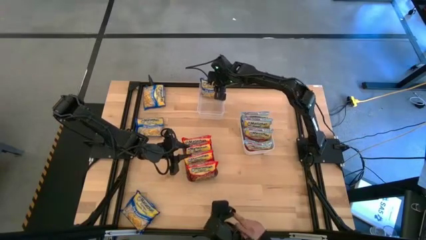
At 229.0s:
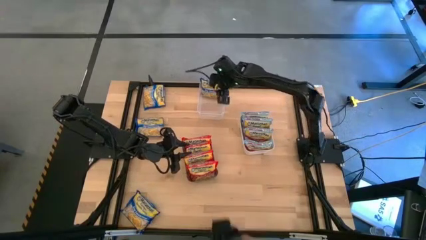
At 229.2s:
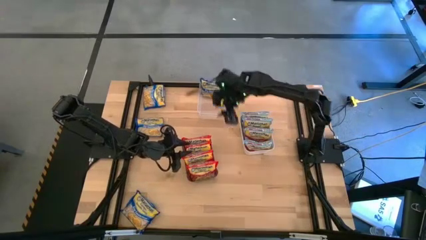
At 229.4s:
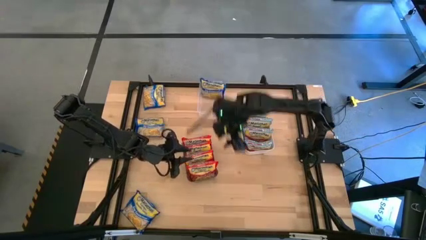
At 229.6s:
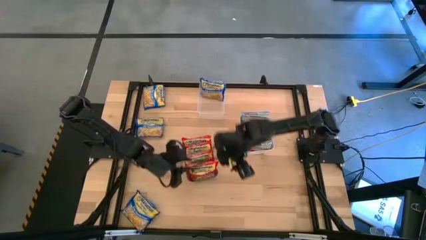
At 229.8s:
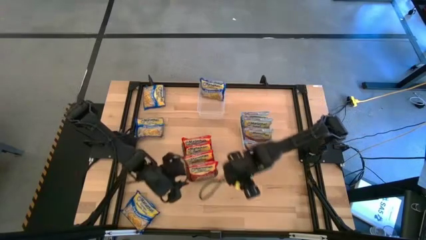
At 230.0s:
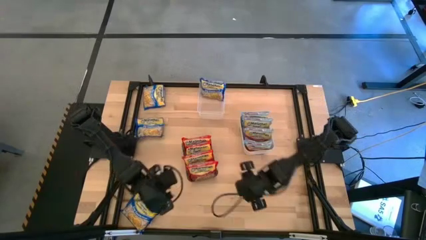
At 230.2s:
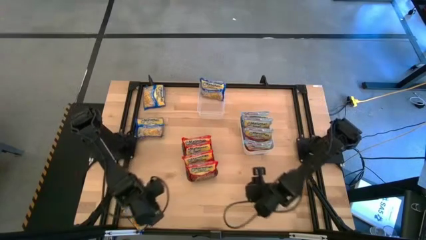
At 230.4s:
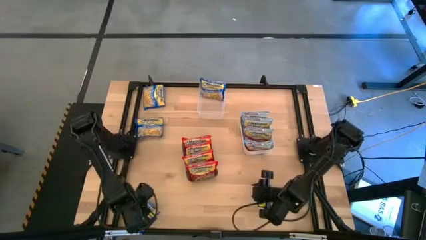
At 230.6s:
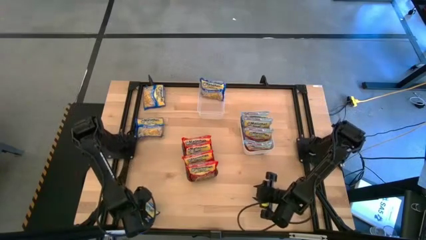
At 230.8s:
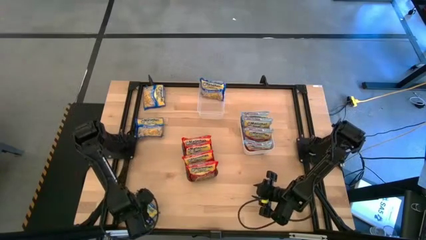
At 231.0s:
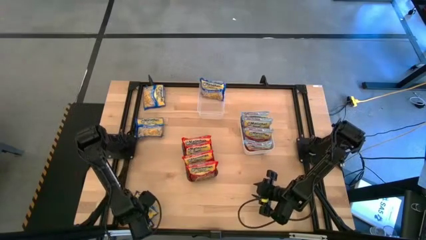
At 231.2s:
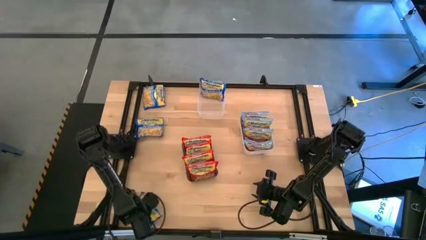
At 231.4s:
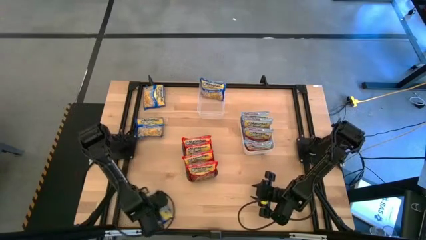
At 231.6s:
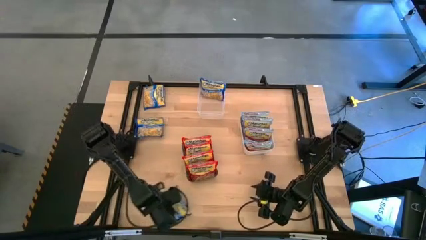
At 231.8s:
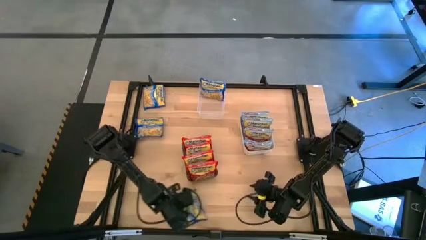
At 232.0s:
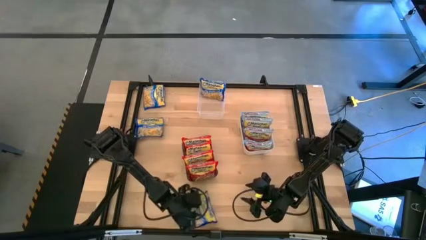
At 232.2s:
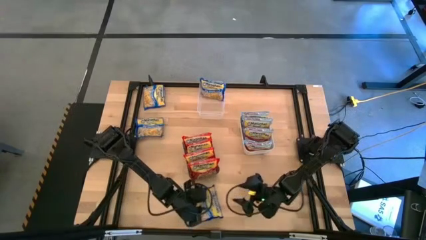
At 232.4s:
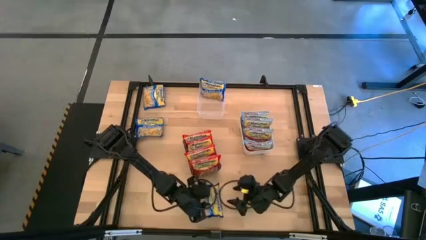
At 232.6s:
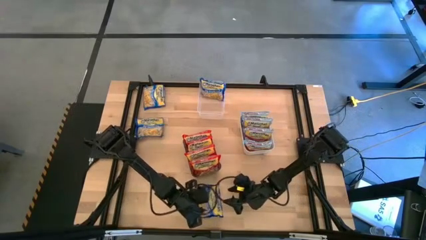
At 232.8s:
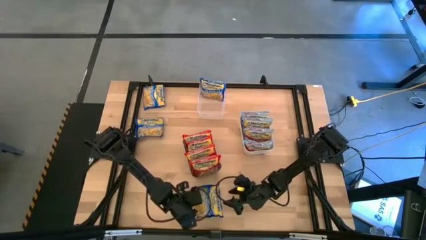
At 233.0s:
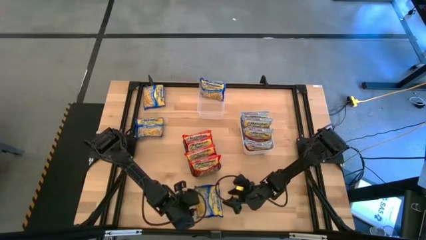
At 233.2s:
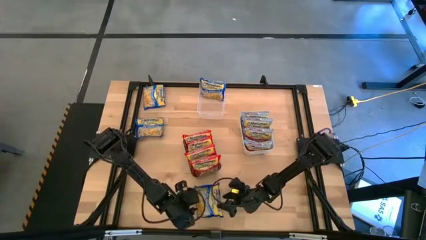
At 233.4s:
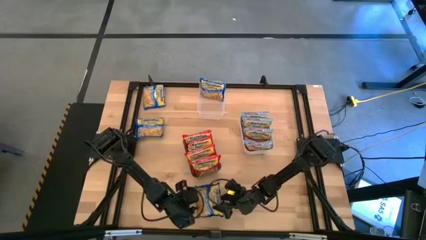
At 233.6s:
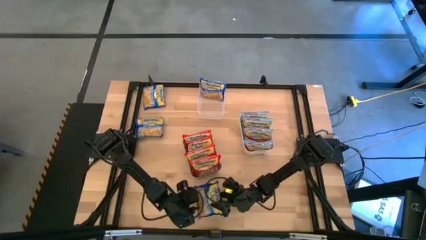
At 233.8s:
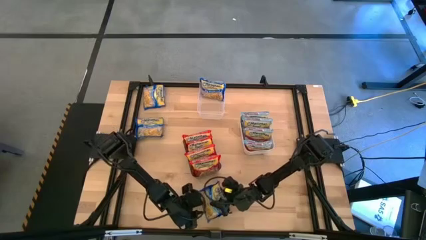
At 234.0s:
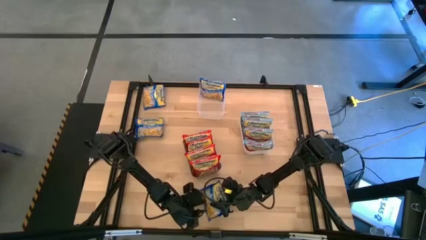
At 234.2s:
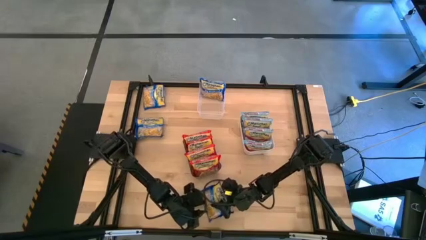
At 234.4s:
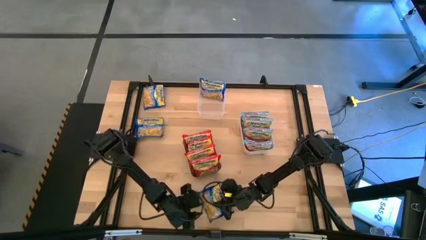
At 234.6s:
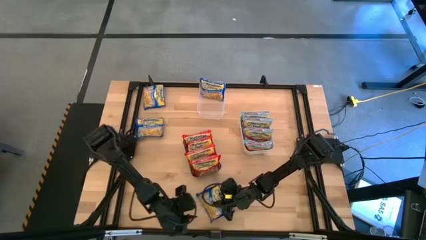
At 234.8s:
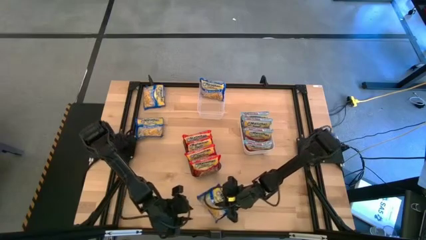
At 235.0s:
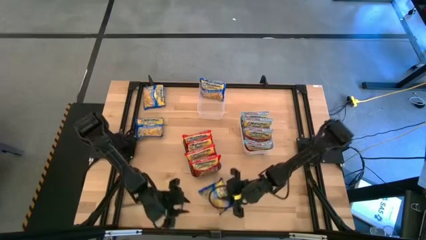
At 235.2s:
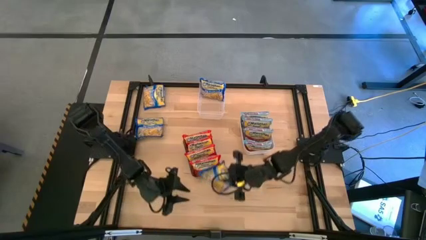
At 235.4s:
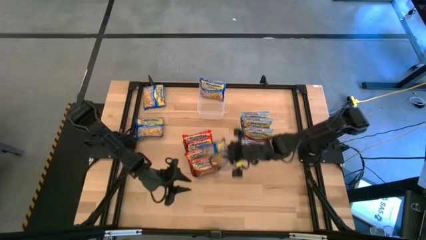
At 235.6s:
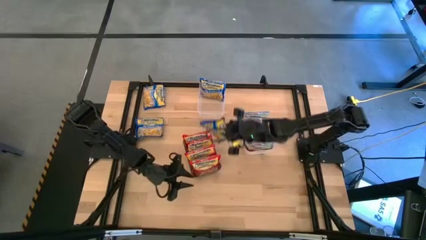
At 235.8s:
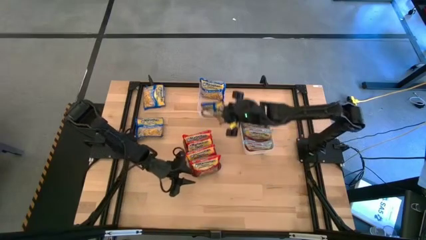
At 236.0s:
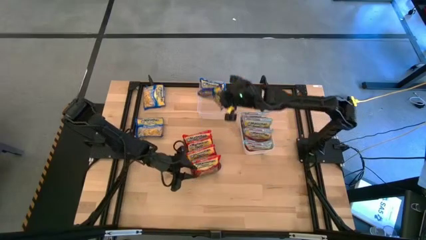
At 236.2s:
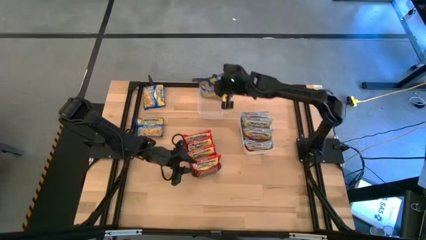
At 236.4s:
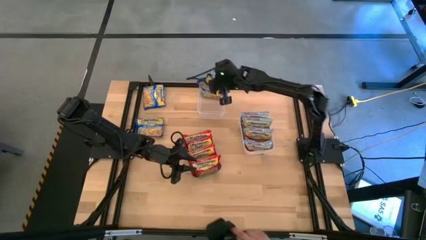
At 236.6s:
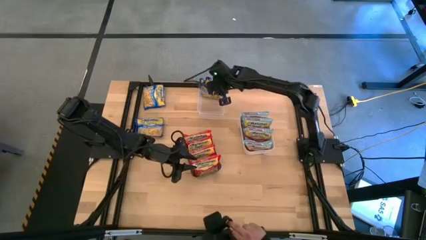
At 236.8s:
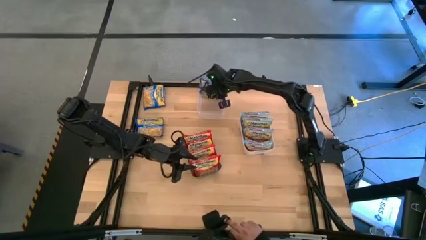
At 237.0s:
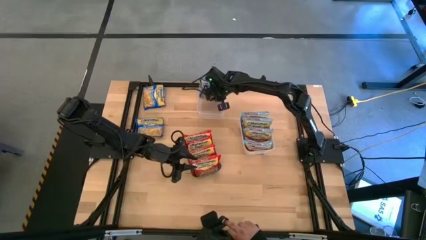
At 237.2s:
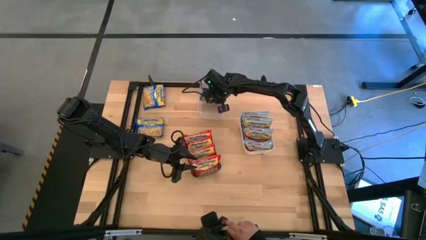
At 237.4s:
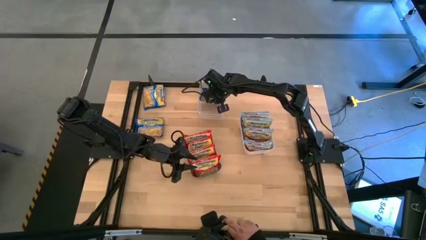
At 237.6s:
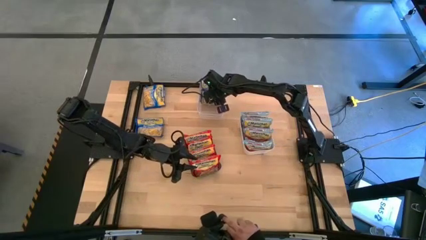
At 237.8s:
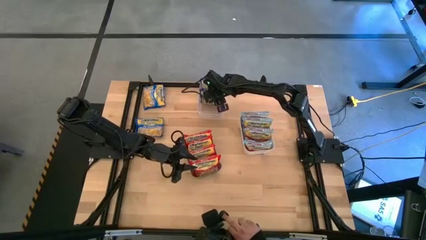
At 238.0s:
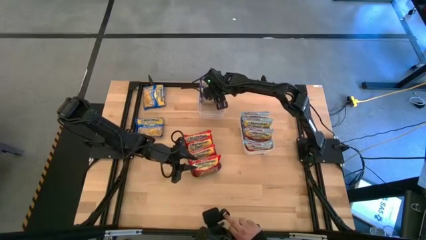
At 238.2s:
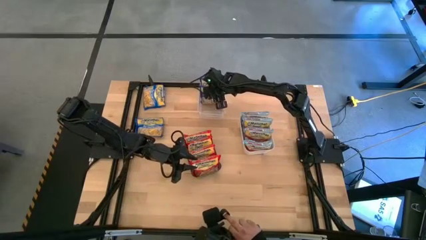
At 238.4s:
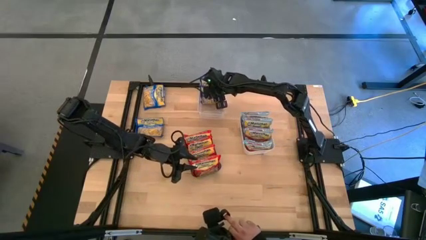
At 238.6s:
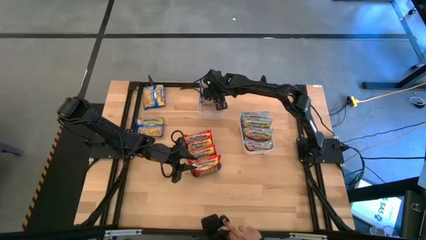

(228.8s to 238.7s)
Task: Sort Maruchan noodles
Put the blue noodle pack into the transparent bin

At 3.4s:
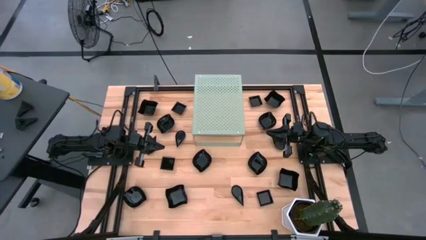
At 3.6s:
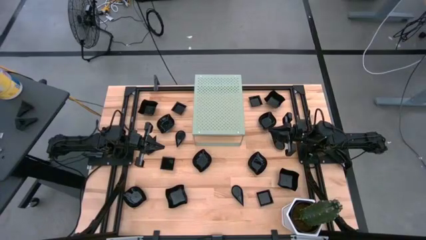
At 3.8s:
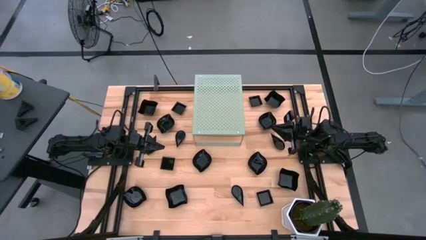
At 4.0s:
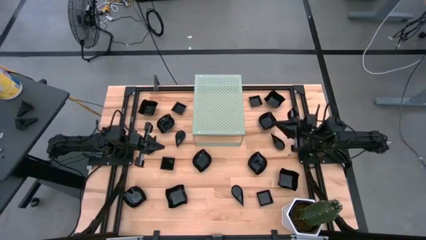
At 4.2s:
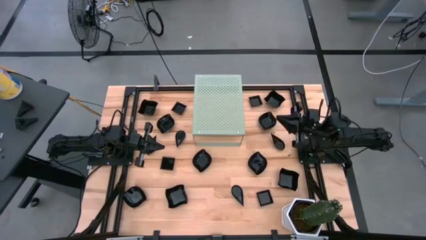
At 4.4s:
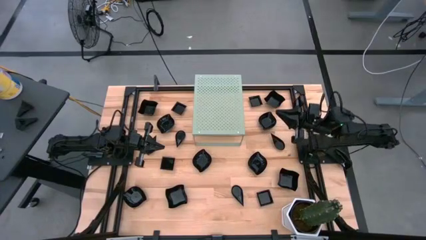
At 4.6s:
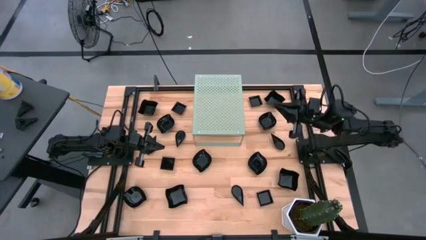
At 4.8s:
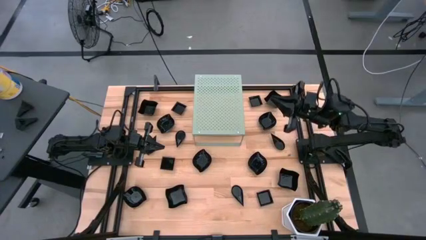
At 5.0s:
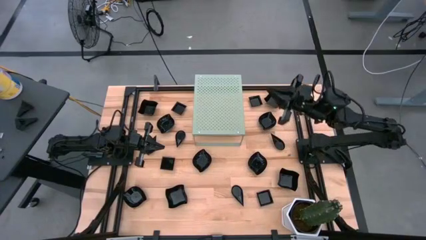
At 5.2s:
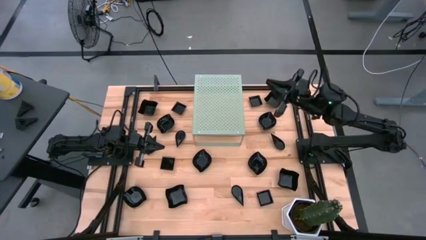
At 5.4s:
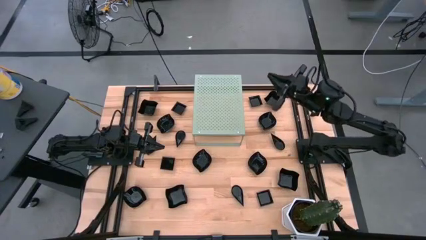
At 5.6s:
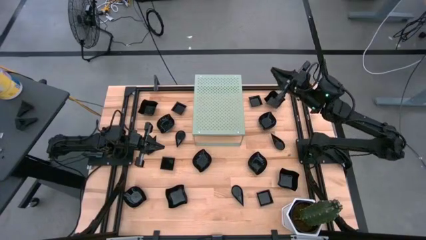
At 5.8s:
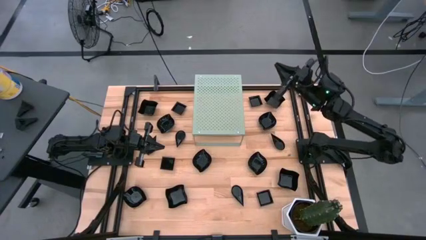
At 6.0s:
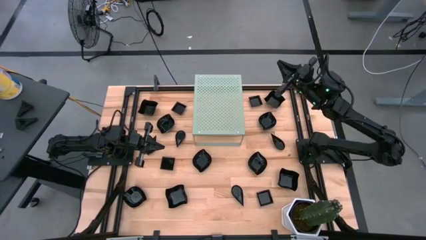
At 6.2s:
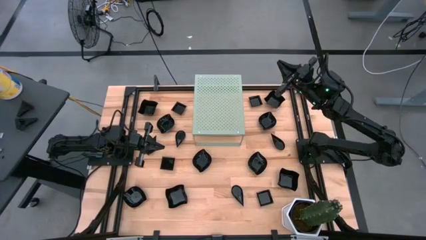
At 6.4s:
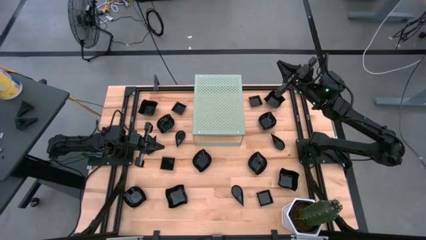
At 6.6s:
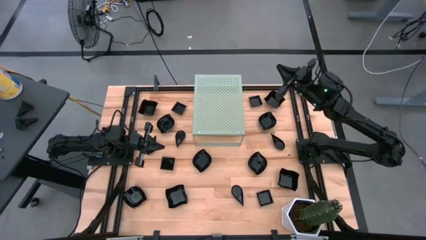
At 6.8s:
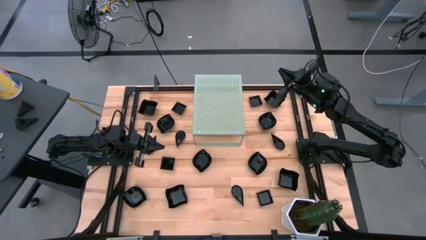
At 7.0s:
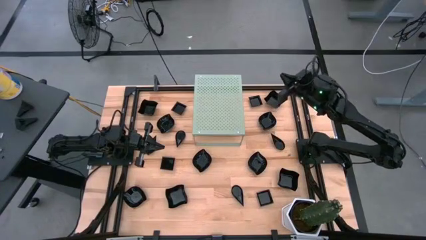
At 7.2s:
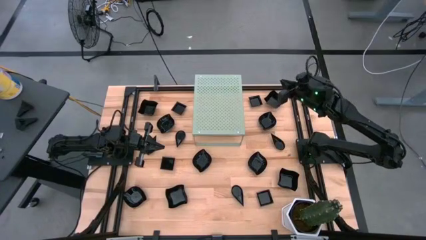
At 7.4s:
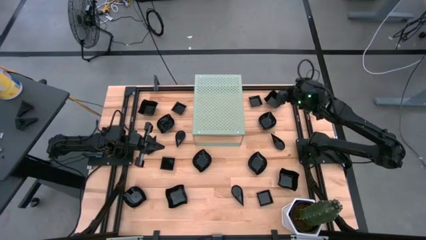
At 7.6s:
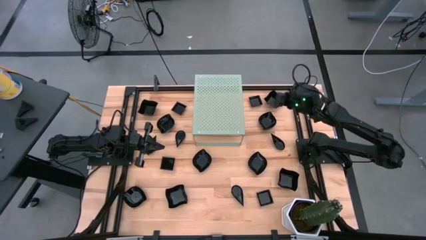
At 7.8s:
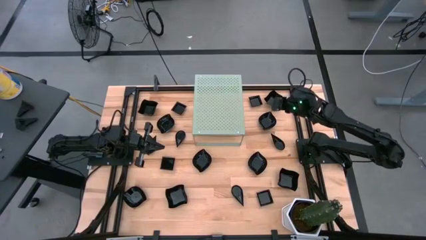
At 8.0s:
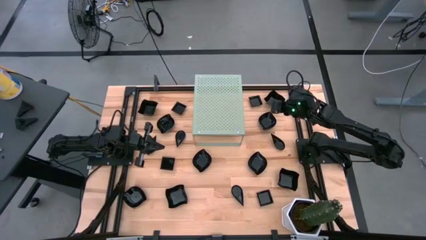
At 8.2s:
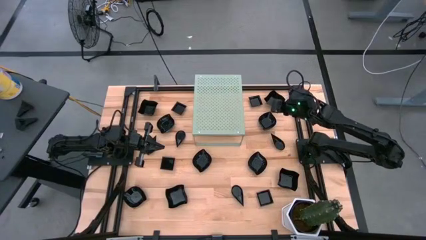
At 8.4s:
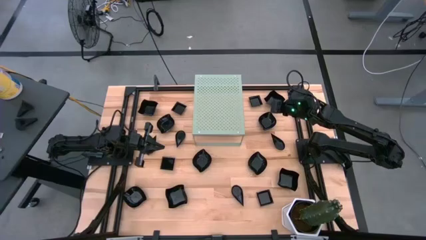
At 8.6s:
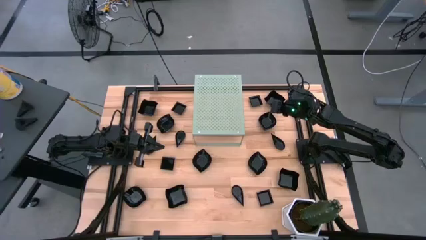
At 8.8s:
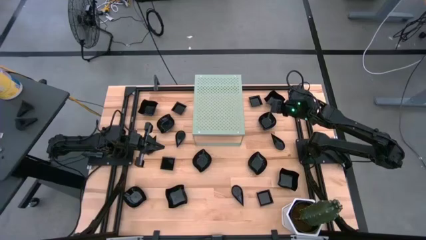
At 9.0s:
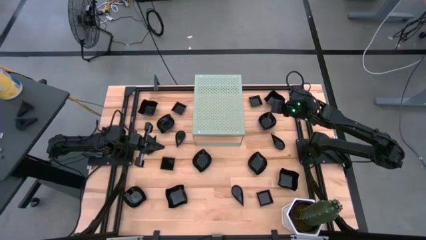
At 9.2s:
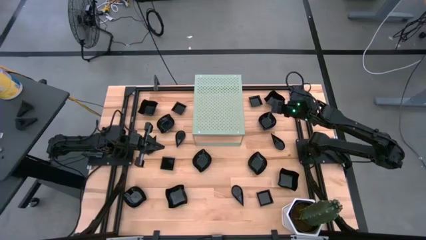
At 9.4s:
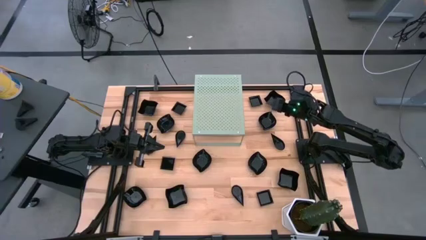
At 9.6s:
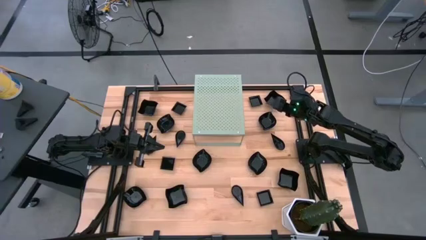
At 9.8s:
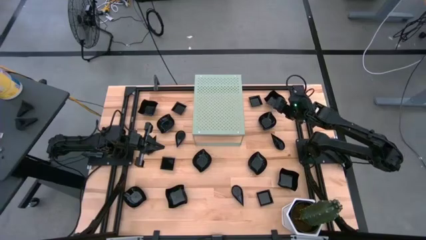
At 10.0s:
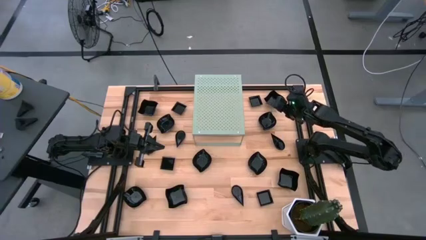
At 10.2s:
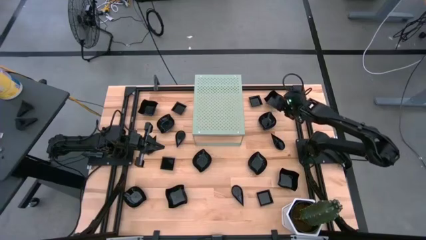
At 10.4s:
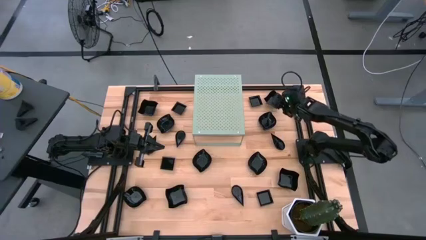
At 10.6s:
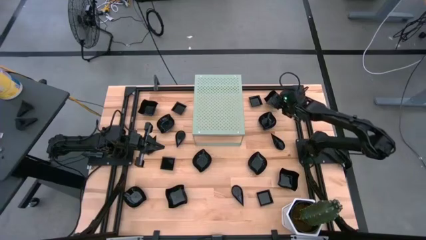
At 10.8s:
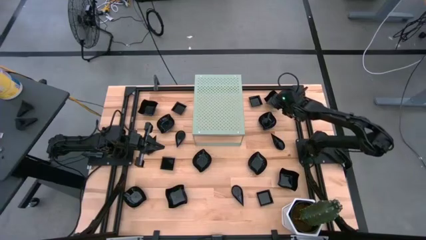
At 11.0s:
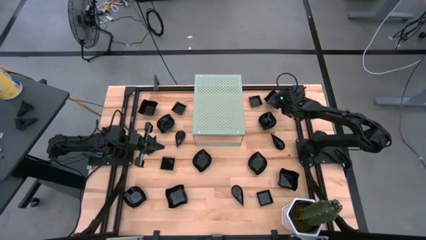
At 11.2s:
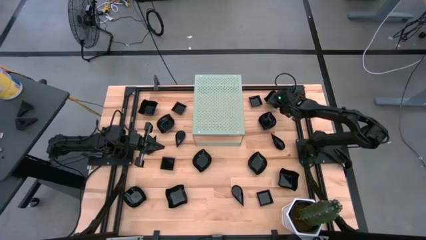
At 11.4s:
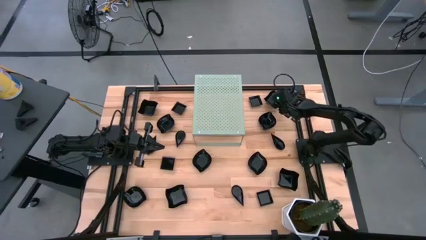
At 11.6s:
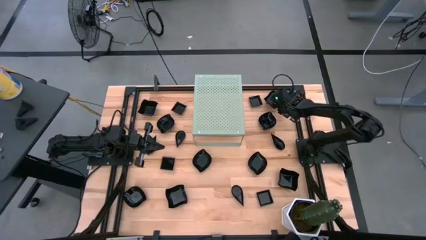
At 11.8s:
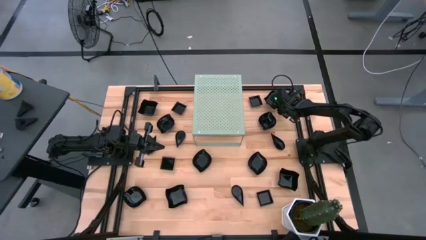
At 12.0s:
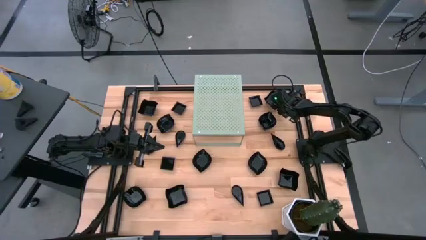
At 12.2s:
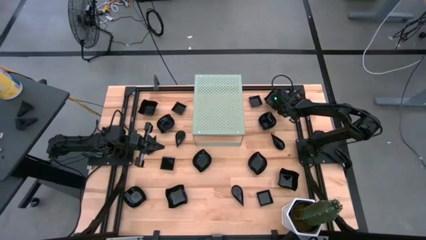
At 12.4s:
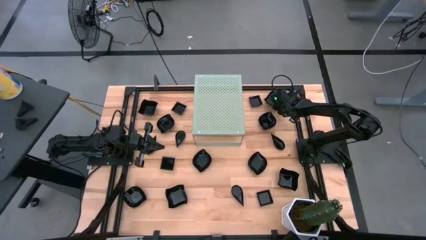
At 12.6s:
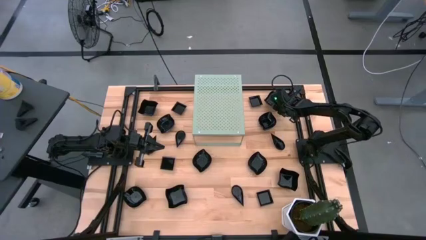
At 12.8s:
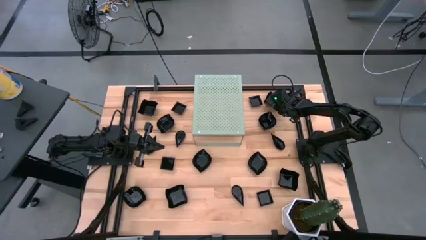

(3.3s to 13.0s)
Task: Pick & Place Mini shaped plates
Put the distorted square plate on the shelf
